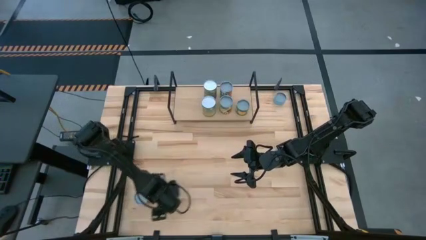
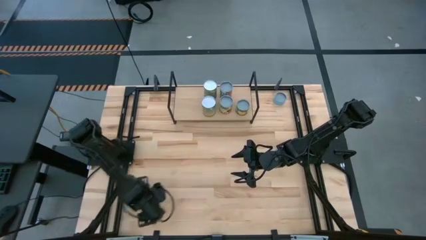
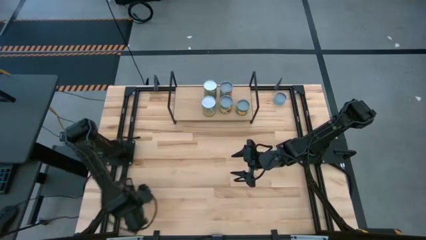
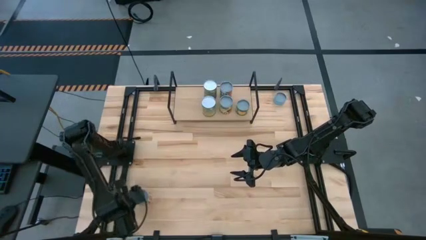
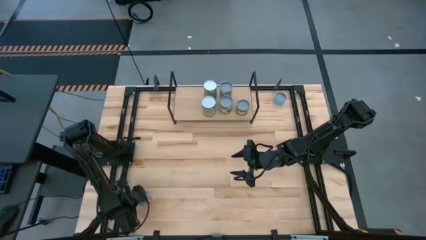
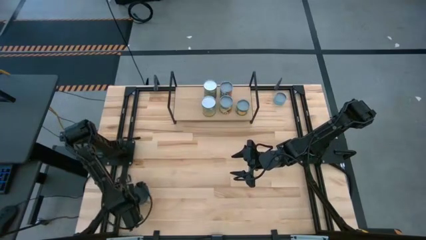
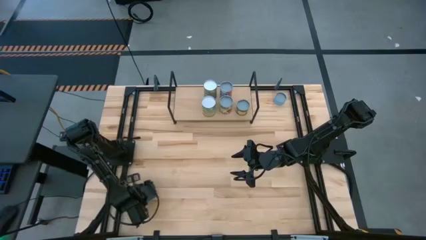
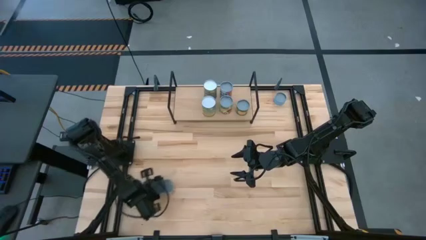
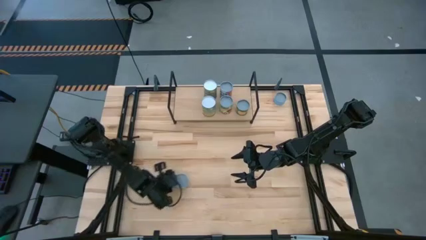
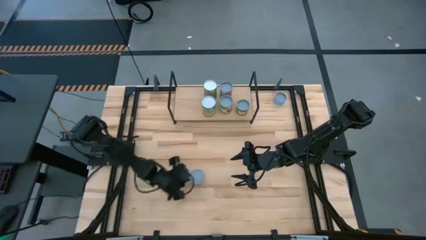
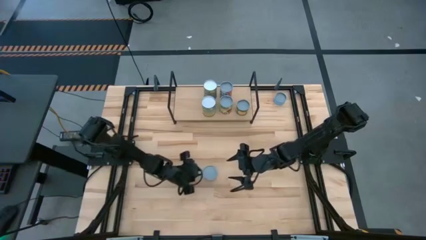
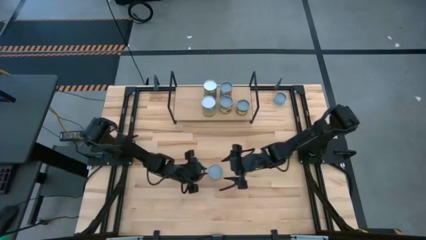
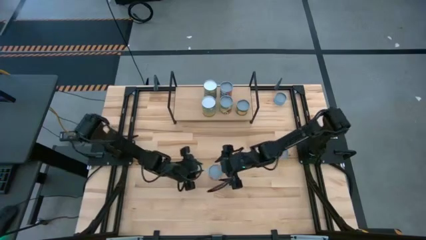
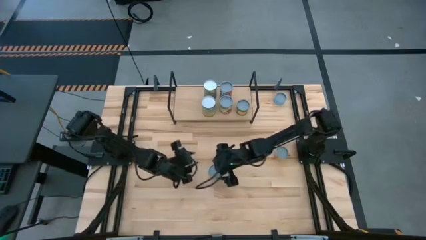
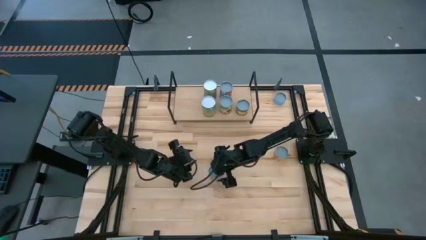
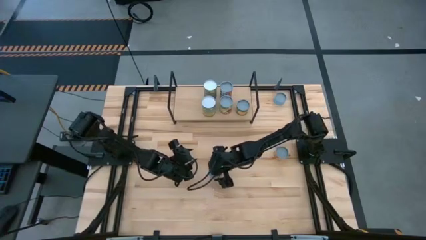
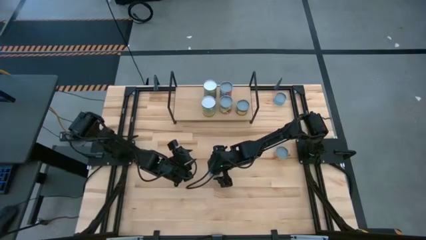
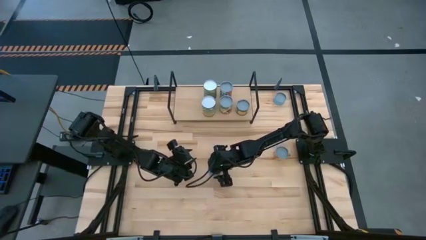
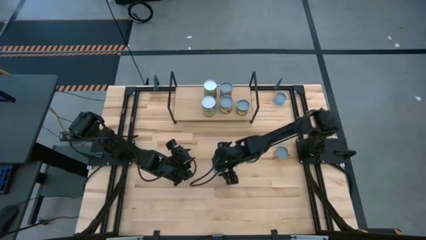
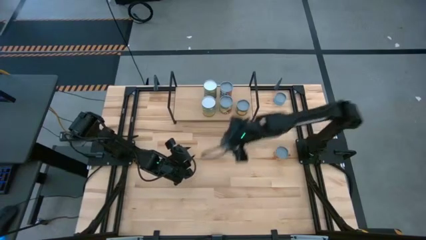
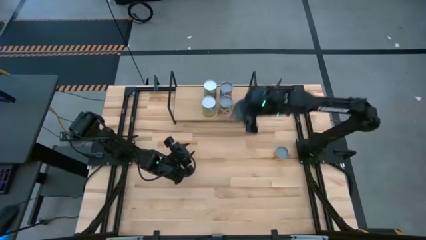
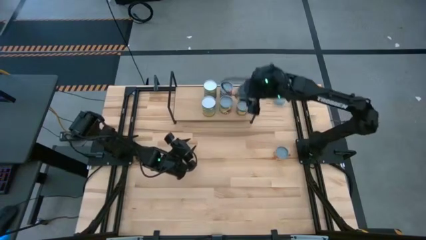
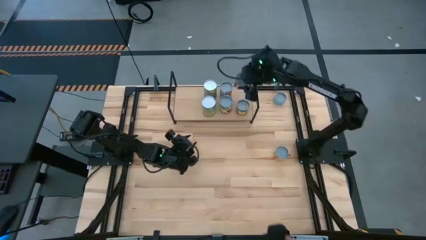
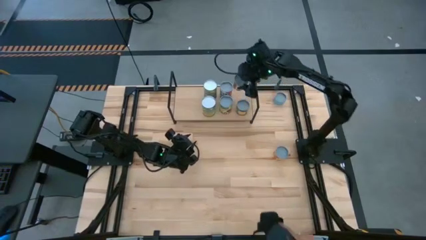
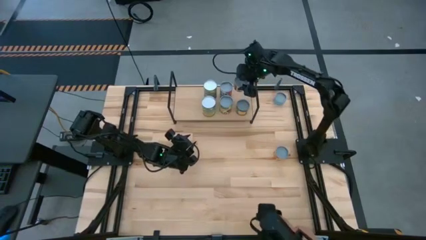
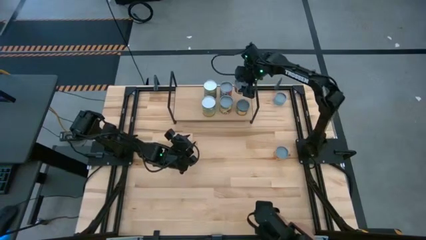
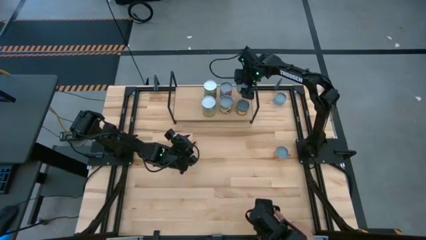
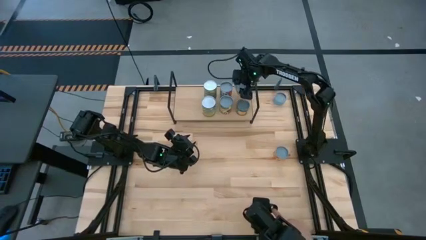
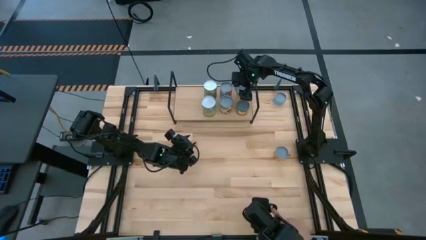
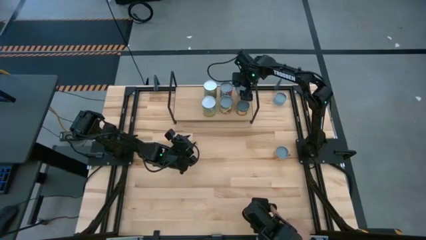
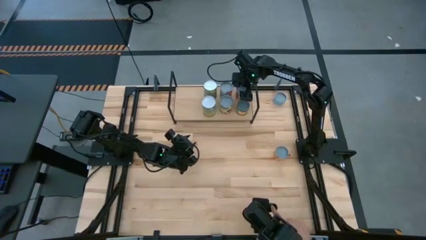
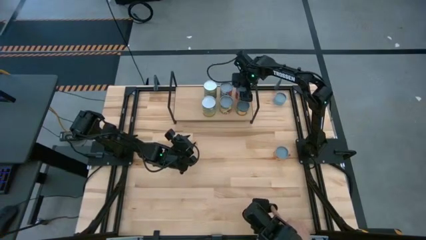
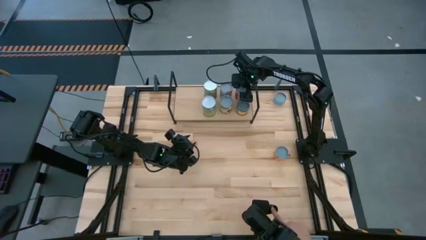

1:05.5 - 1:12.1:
Task: Pick and place cans onto a shelf
Put the canned tomatoes on the shelf

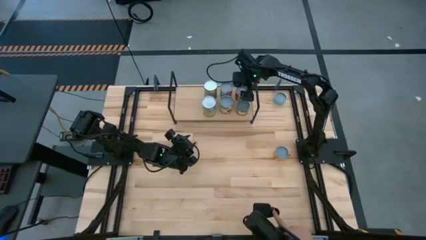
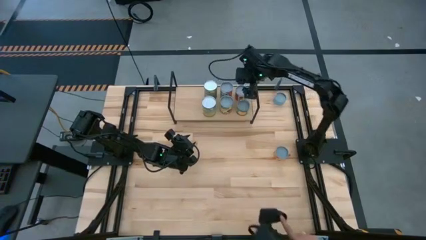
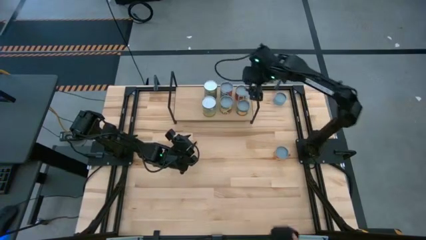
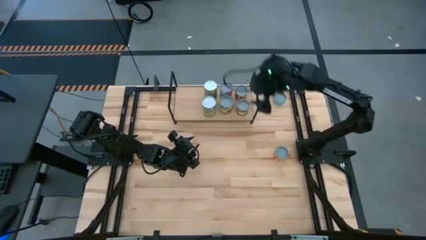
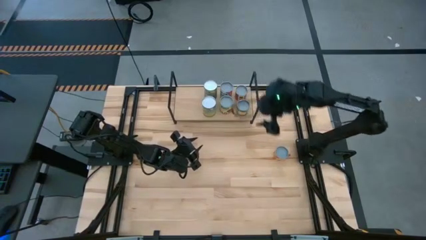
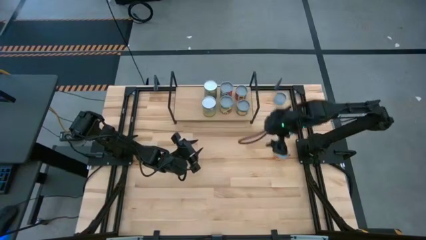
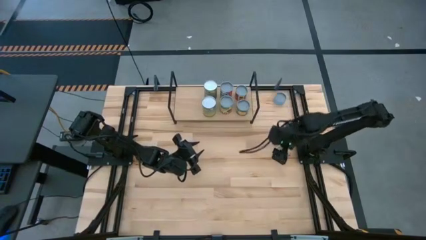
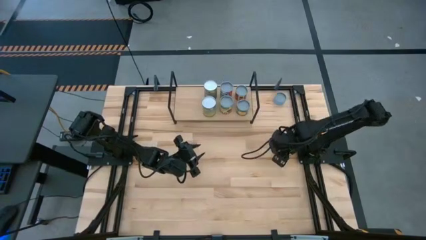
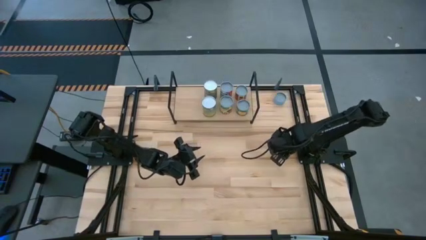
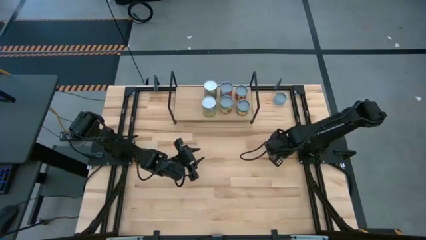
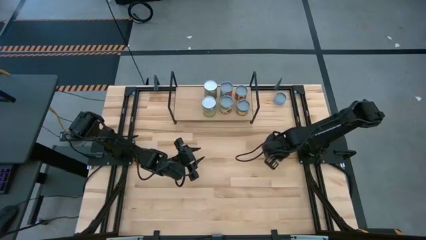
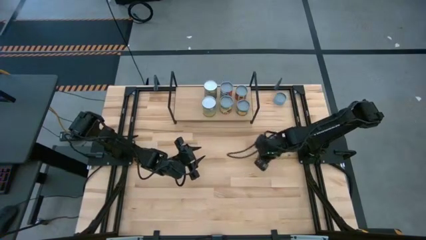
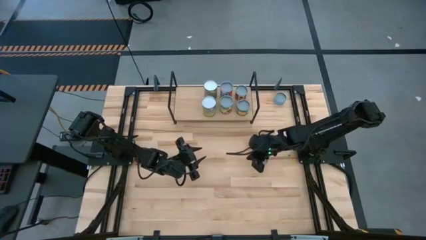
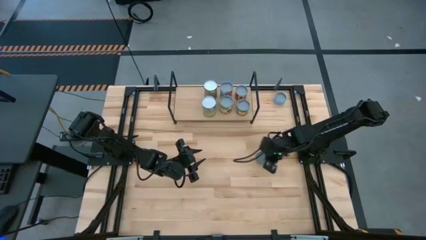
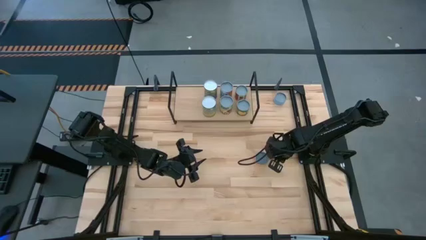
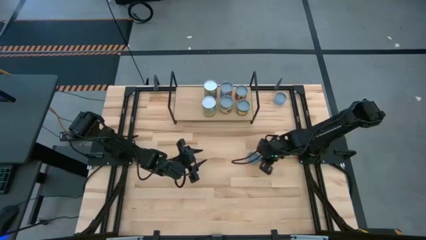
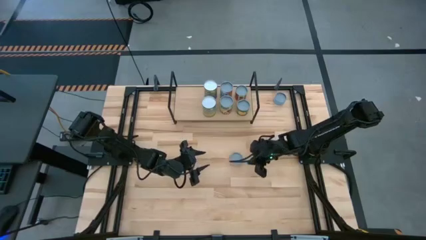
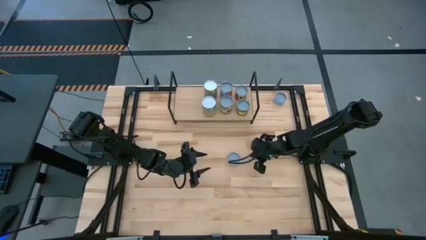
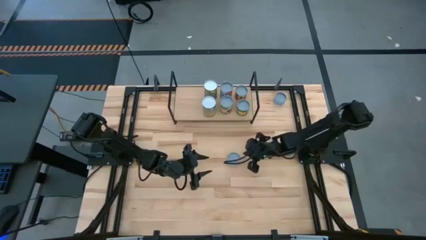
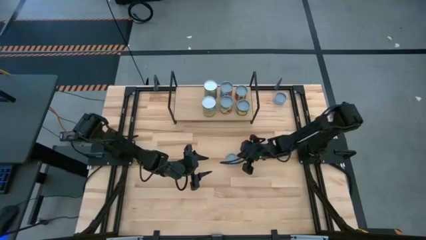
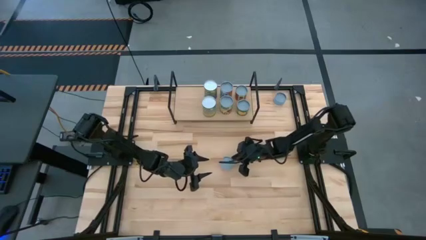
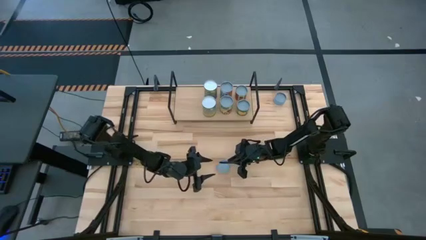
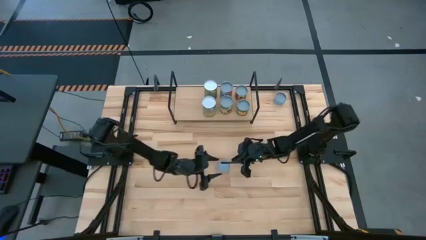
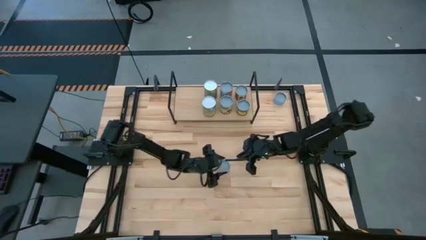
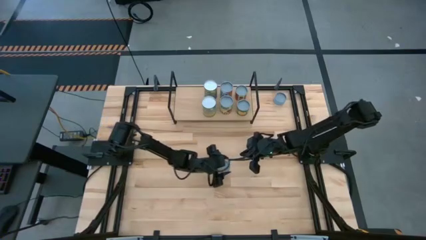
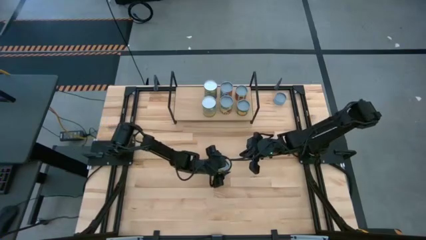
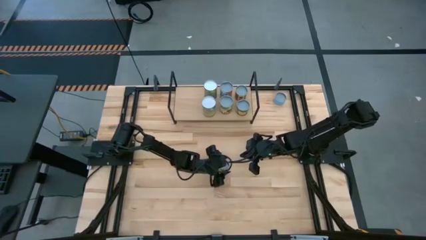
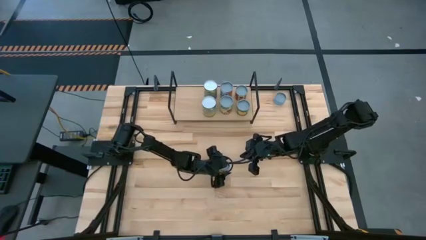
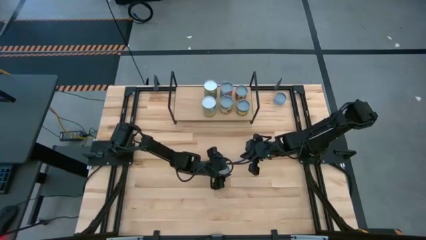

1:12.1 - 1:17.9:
Put the pineapple rings on the shelf

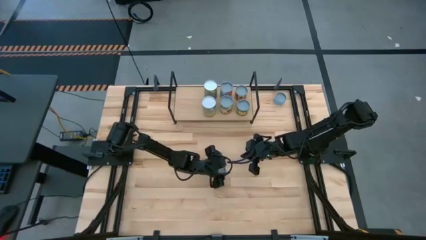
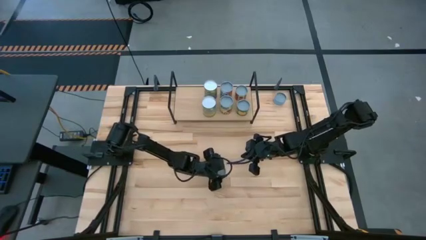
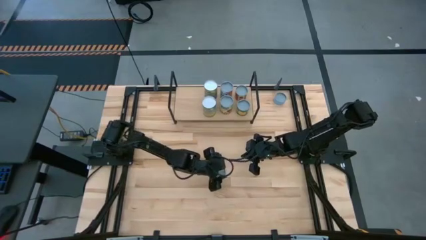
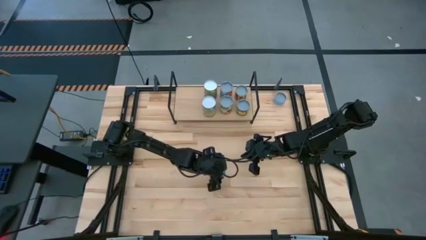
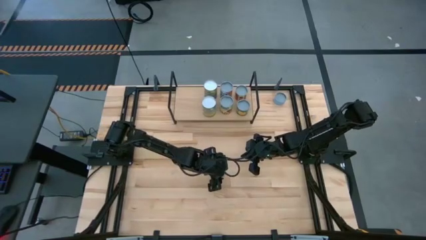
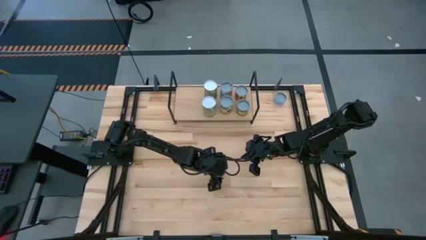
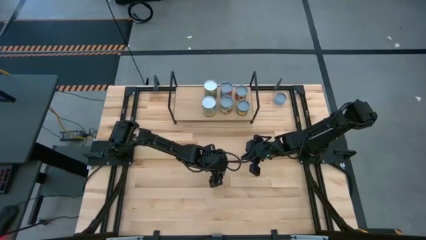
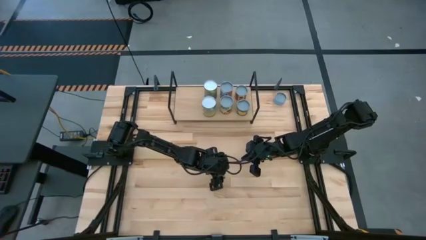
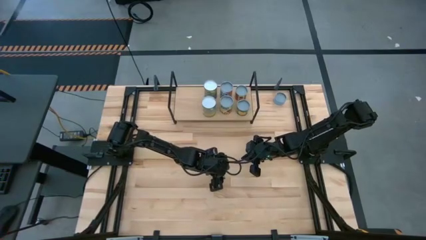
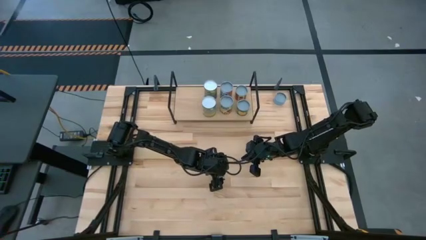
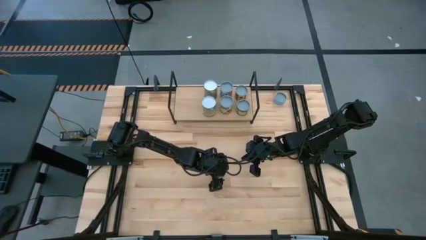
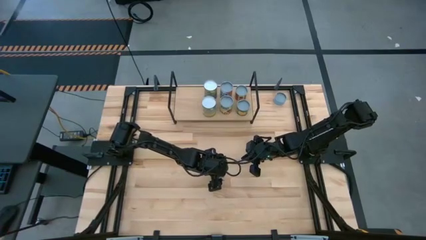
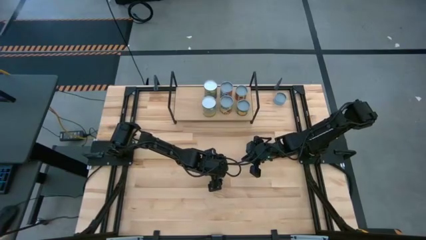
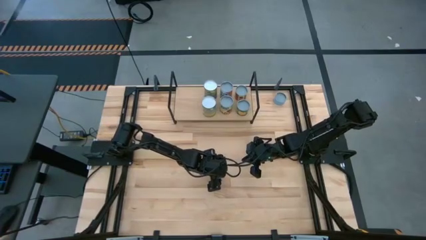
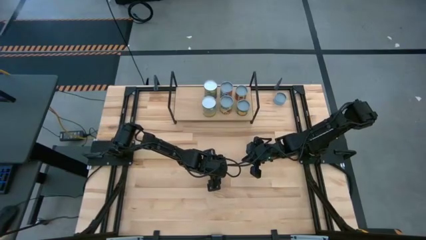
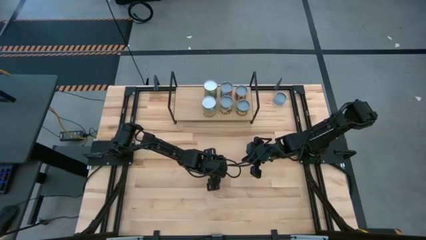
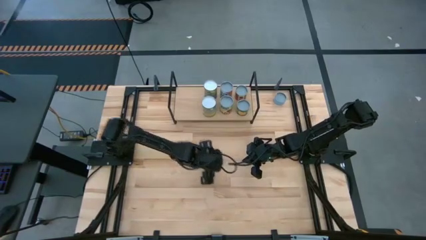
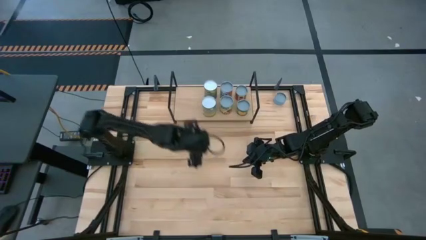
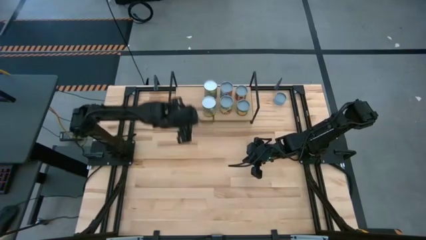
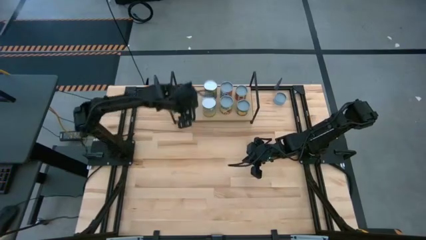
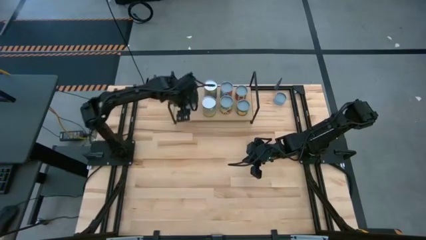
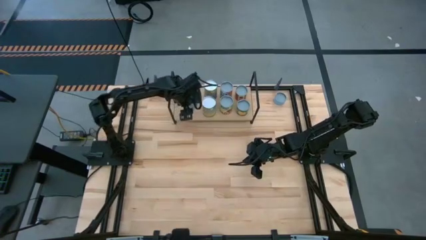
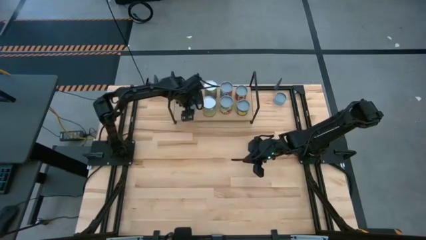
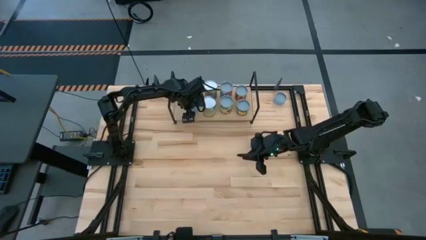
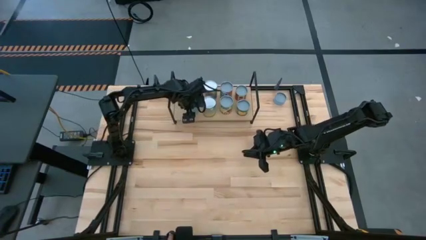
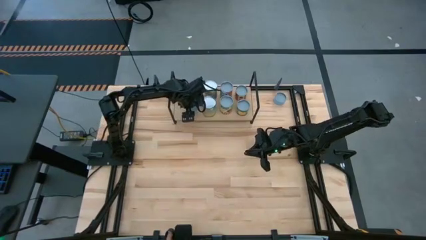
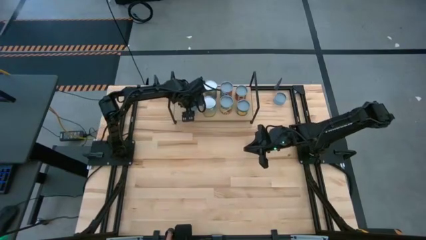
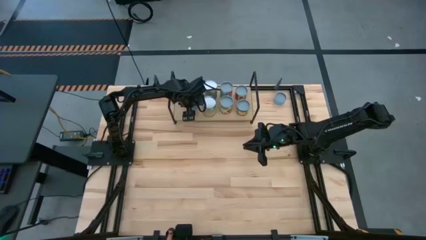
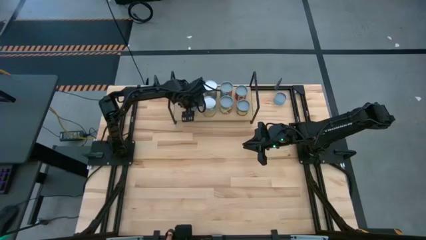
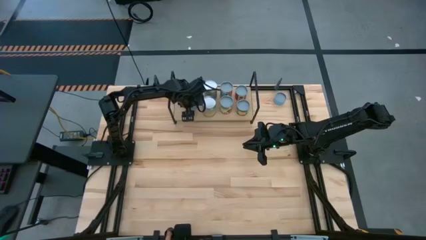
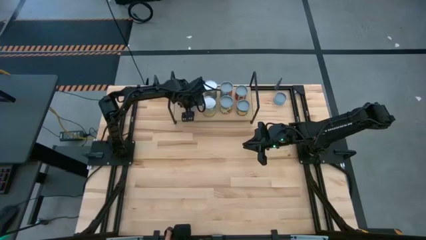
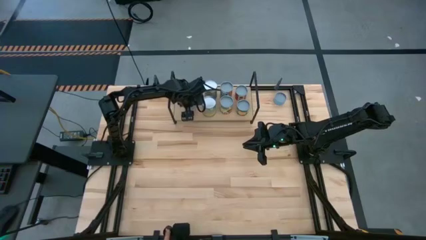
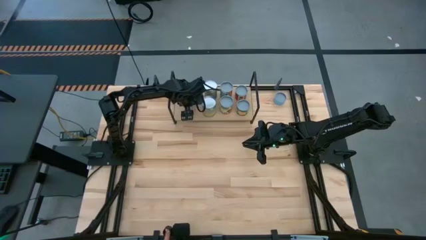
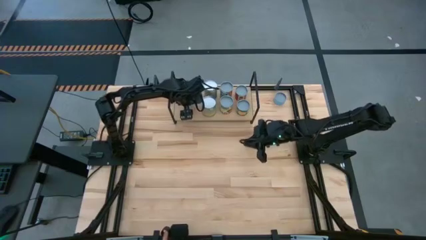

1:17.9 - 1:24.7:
Put the pineapple rings on the shelf
